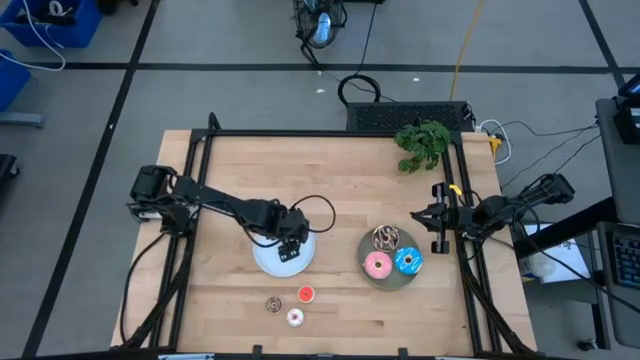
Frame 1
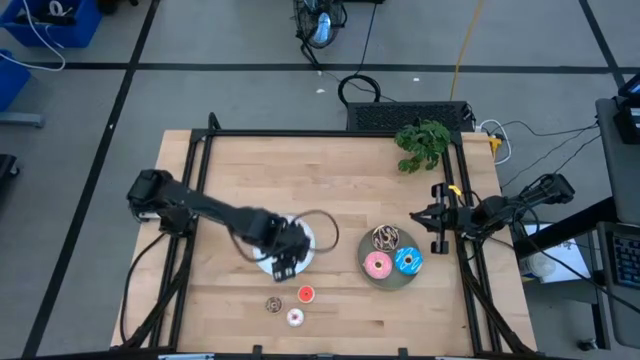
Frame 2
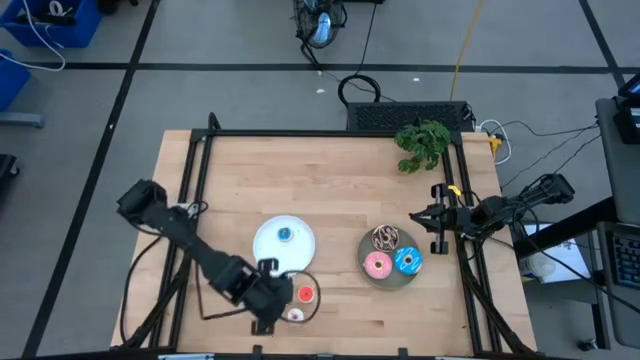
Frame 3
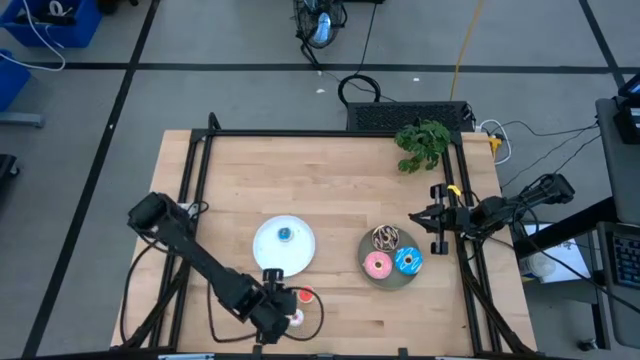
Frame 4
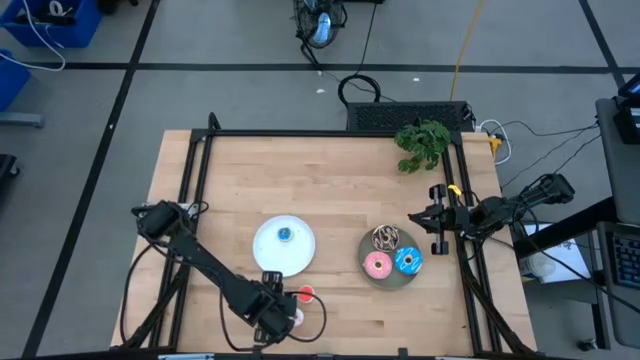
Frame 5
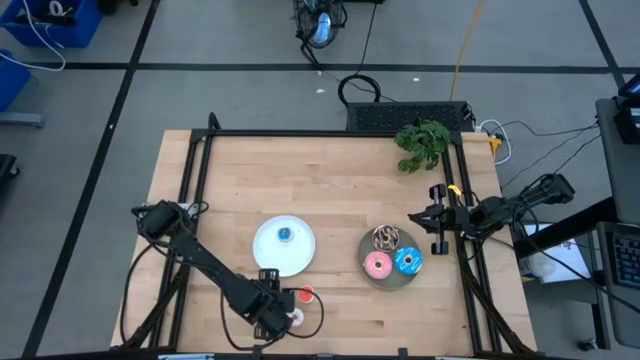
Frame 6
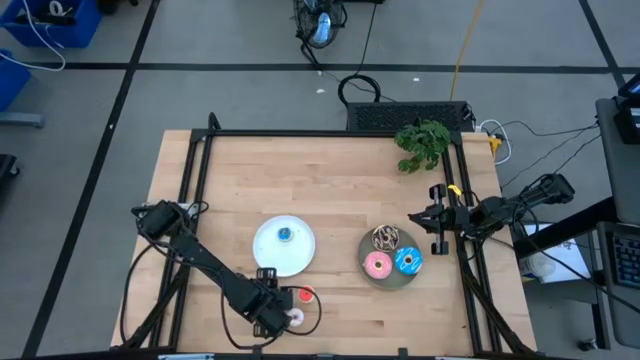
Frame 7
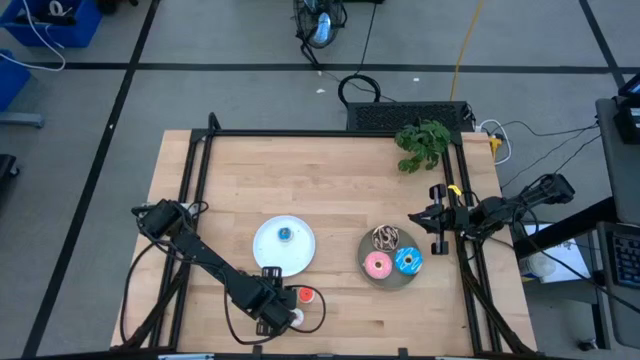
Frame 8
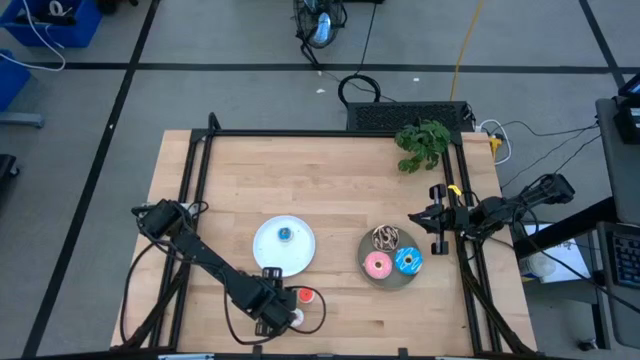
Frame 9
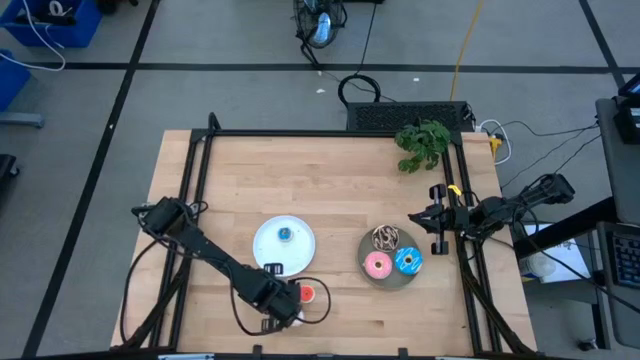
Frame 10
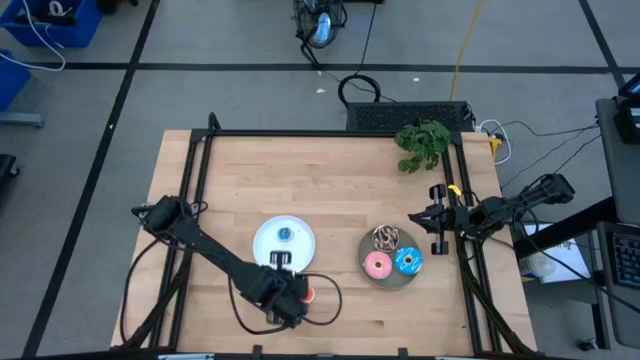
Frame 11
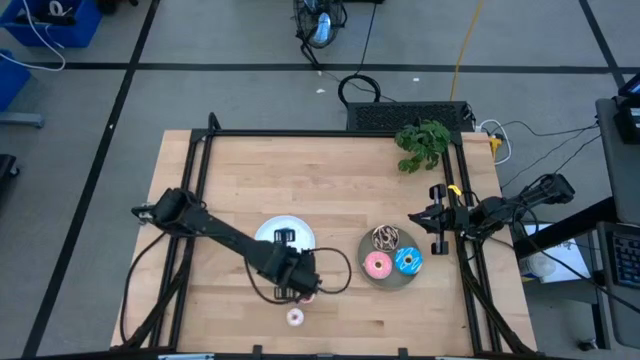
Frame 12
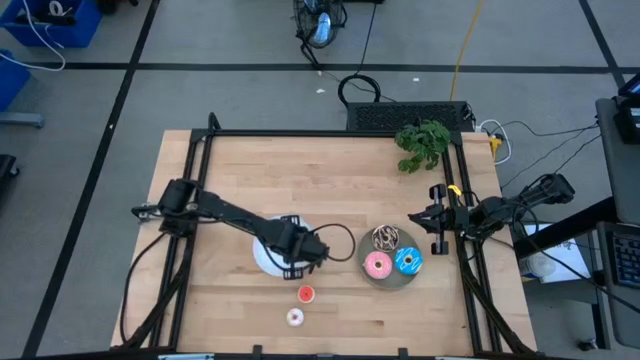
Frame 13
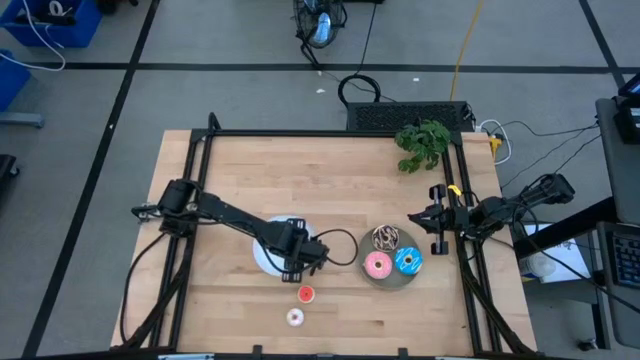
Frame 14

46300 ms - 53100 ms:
Task: Pick & Place donuts
Put the small brown donut on the white plate

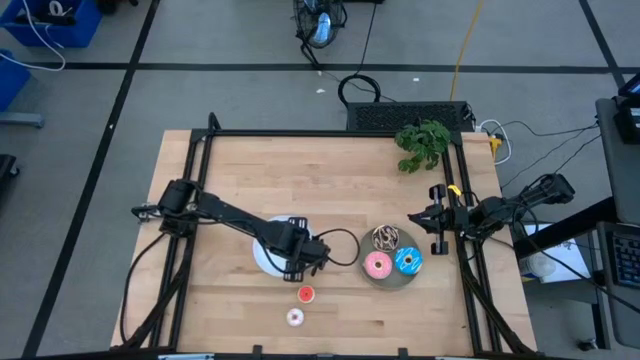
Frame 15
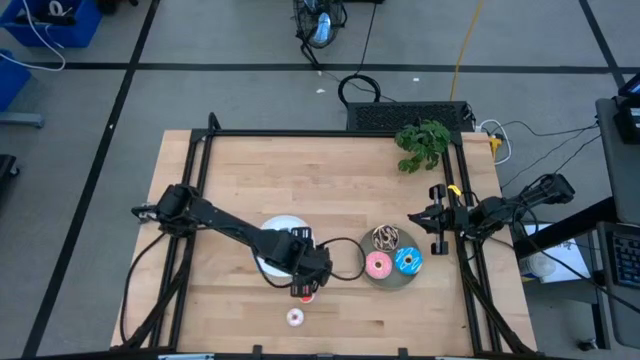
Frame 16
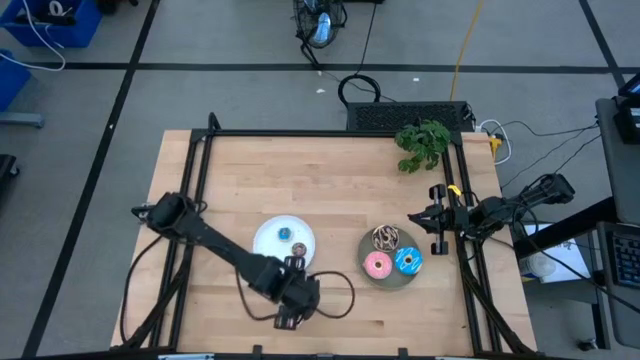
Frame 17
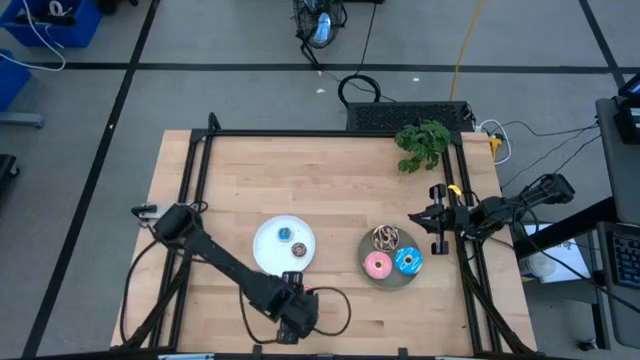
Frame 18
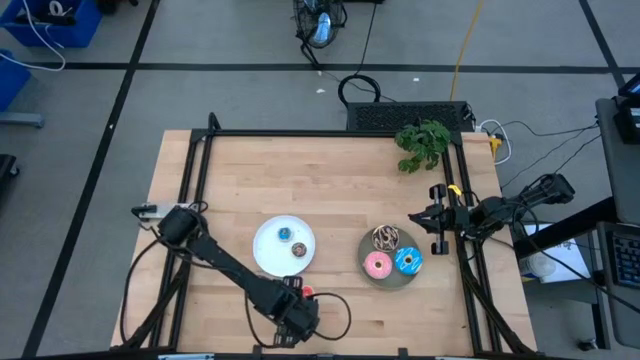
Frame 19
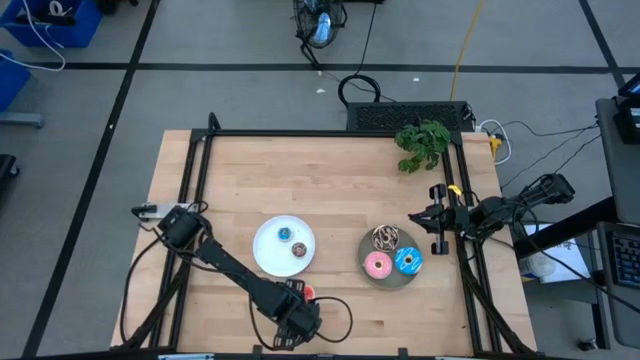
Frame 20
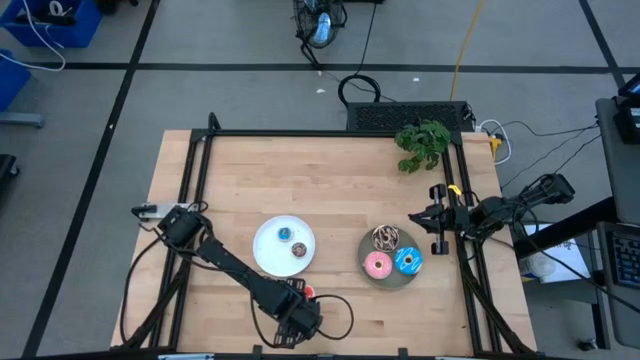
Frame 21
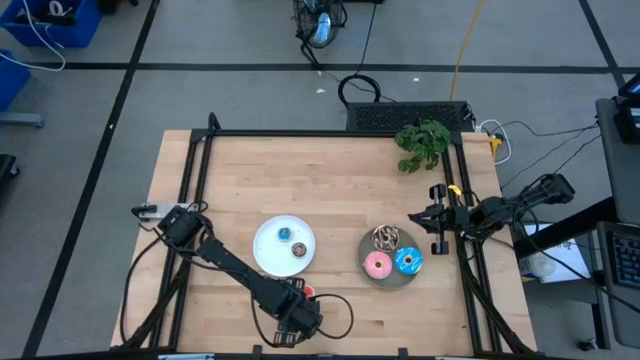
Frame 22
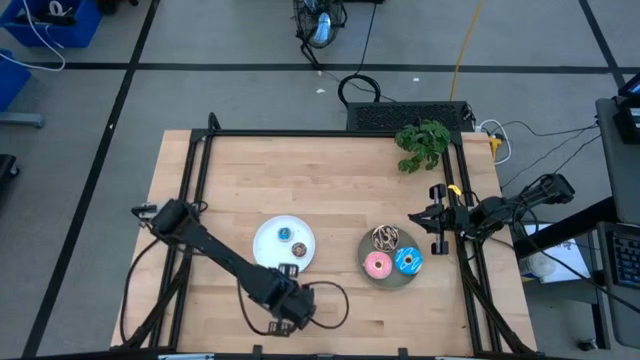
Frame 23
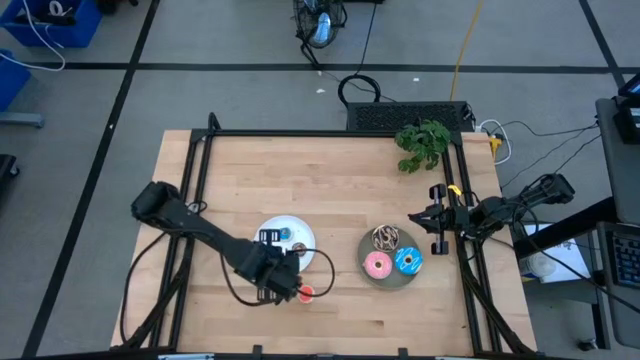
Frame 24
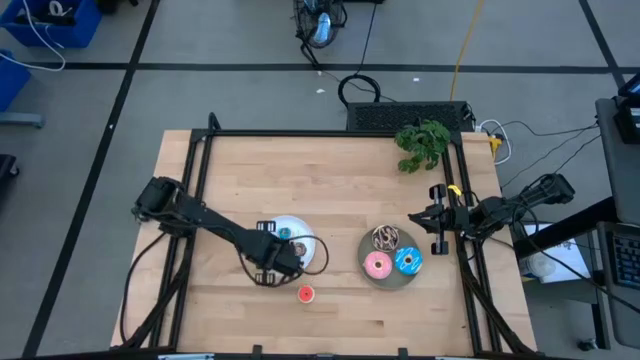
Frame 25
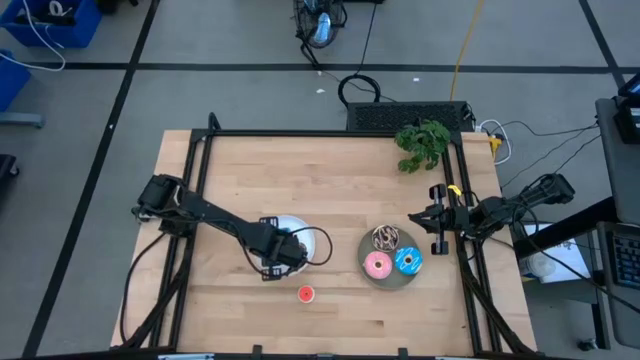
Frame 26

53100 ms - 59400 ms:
Put the small white donut on the white plate

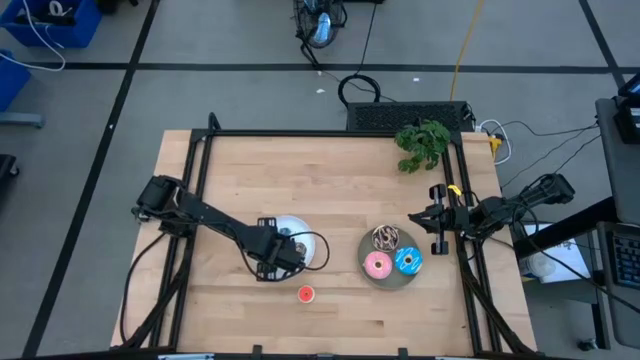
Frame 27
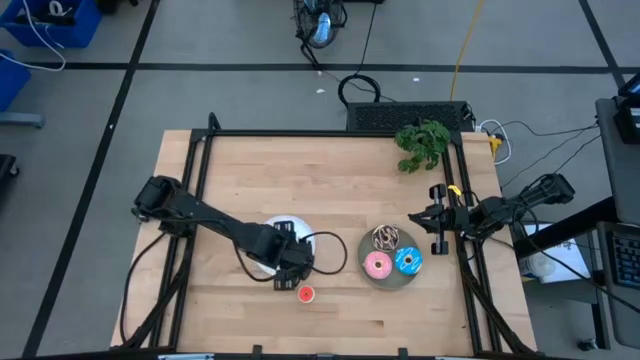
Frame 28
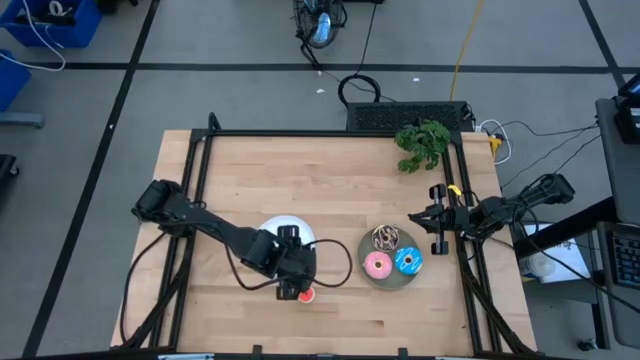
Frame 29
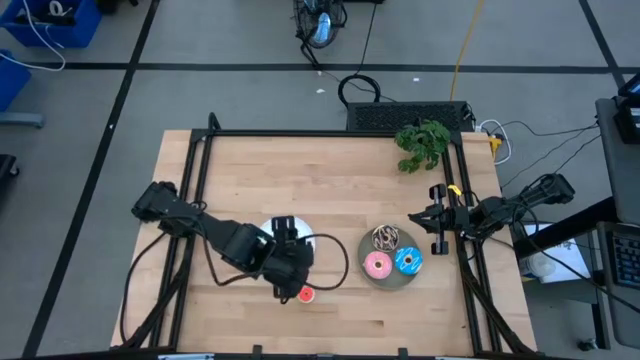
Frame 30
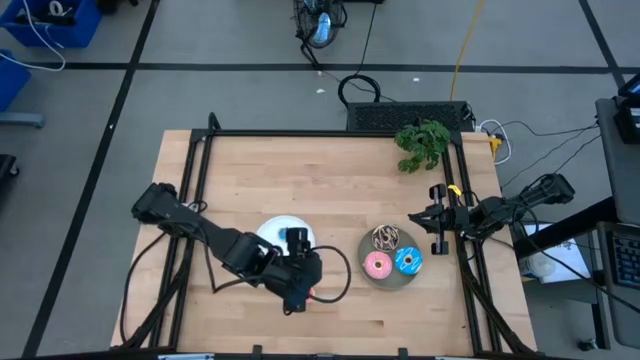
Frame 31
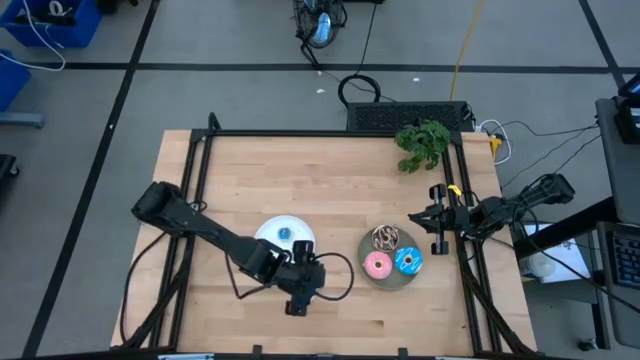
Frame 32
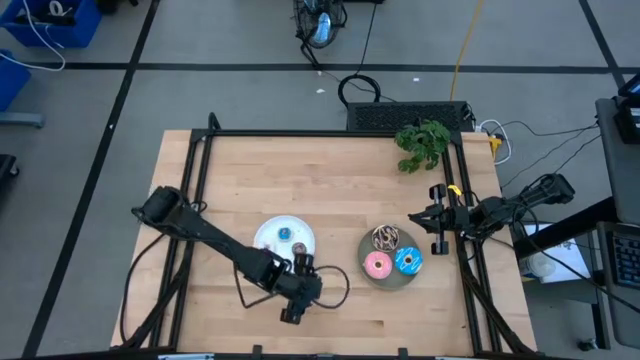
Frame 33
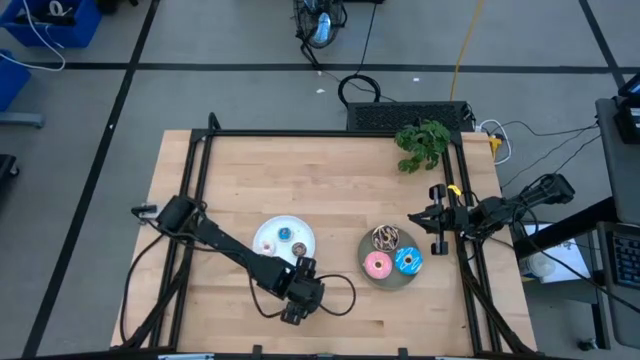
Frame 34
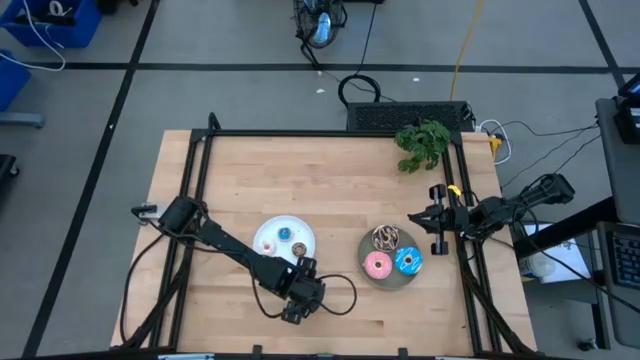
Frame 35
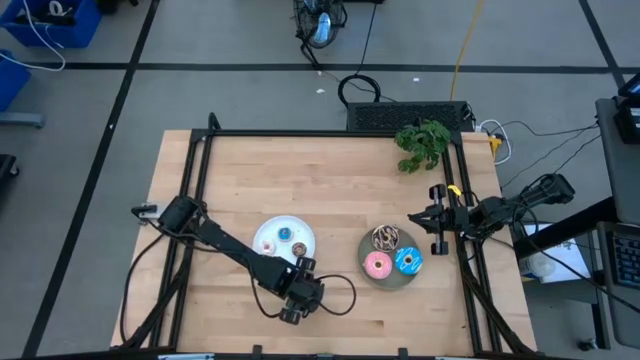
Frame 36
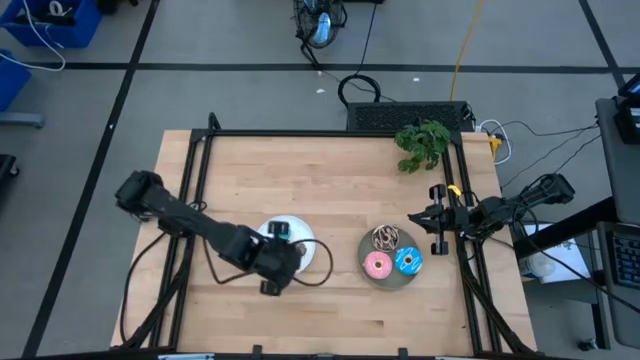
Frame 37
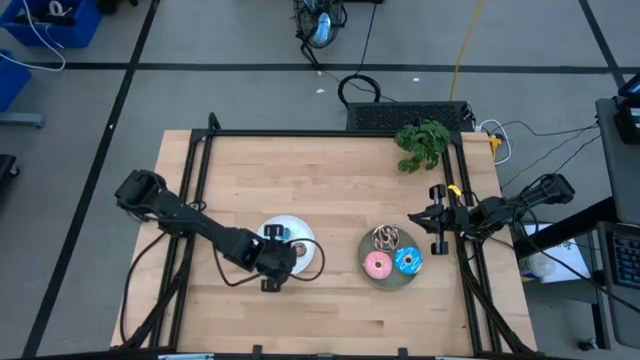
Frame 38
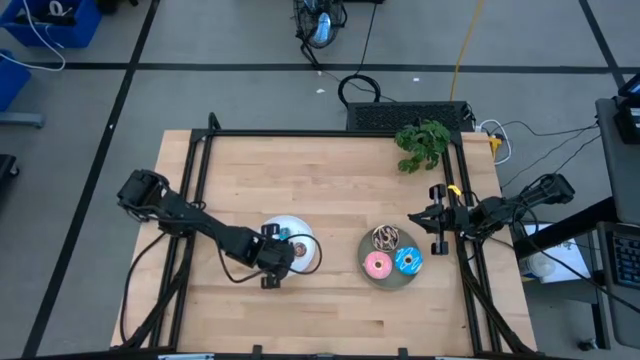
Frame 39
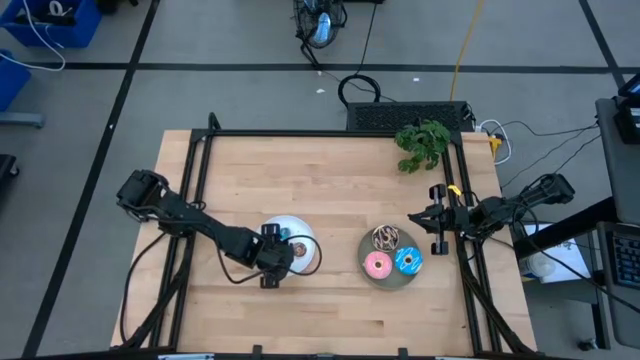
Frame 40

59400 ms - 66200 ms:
Put the small orange donut on the white plate

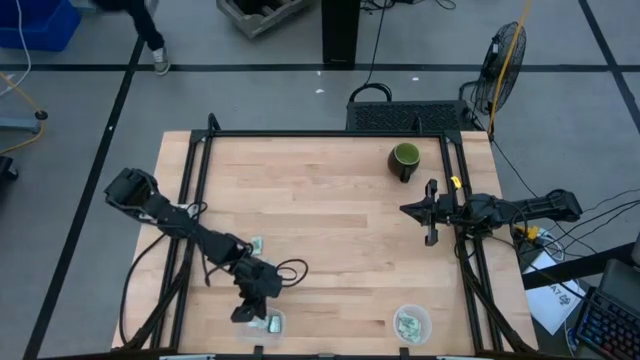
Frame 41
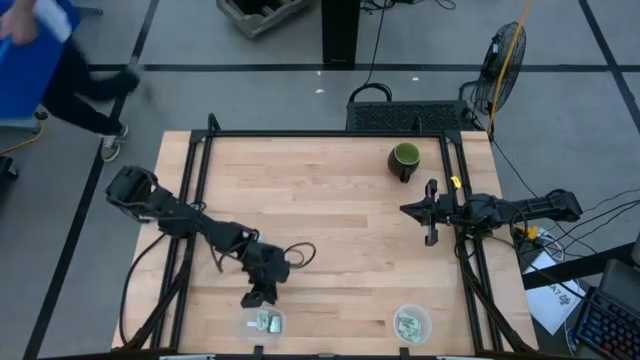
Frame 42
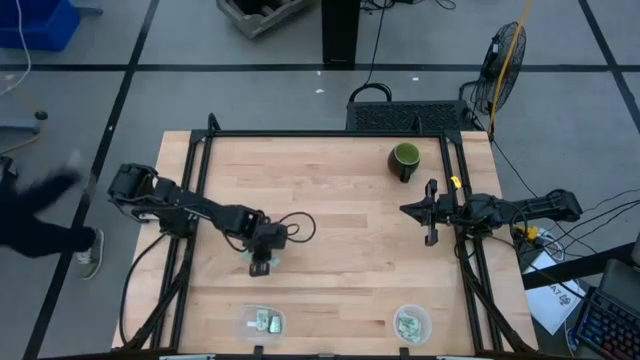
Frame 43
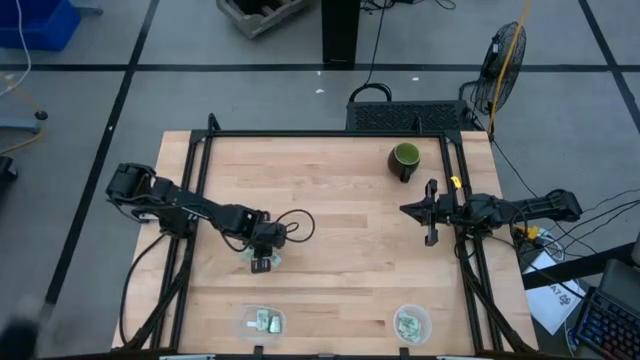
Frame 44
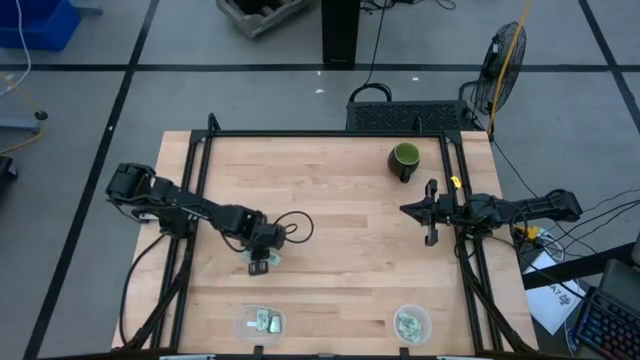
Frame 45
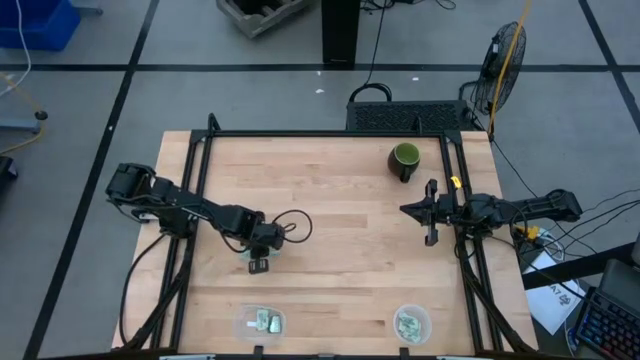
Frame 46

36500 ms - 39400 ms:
Task: Pick and place Stevia / Truvia into bins
Put the stevia packet into the left transparent container
